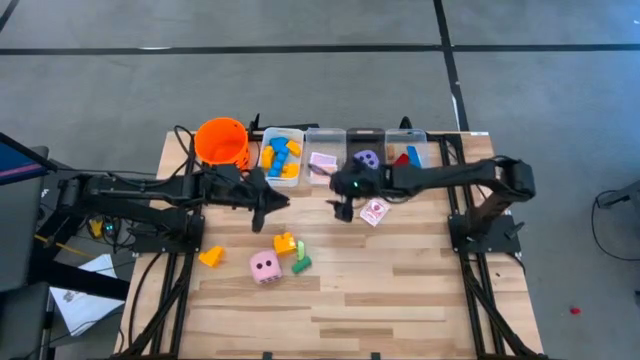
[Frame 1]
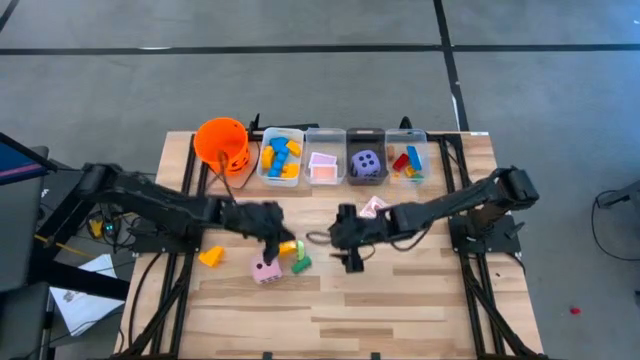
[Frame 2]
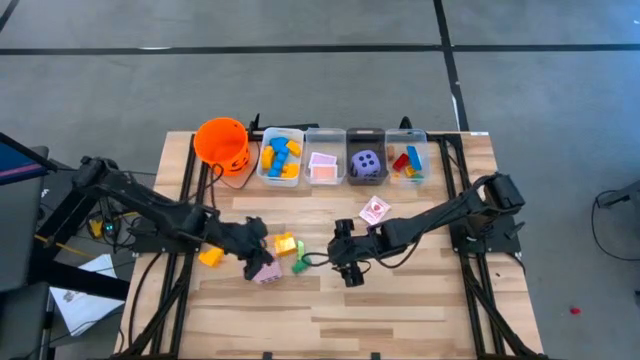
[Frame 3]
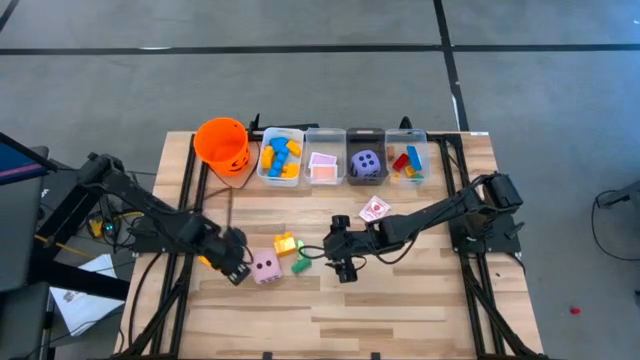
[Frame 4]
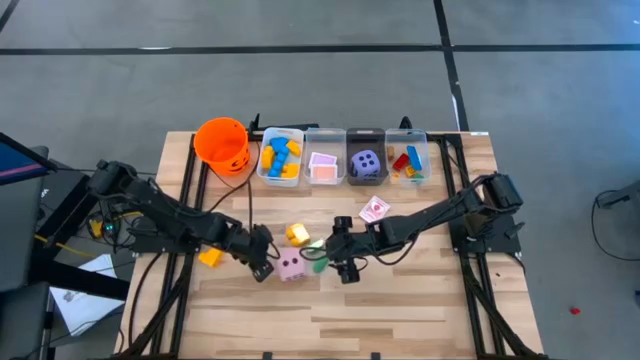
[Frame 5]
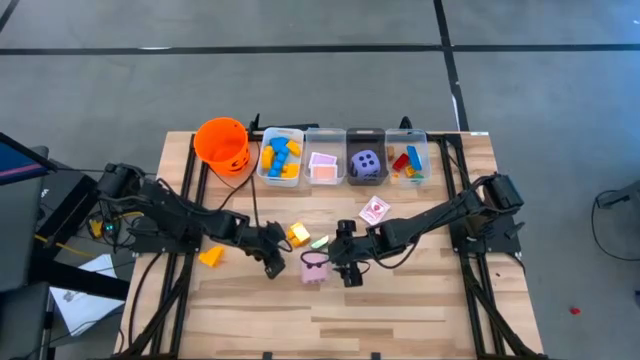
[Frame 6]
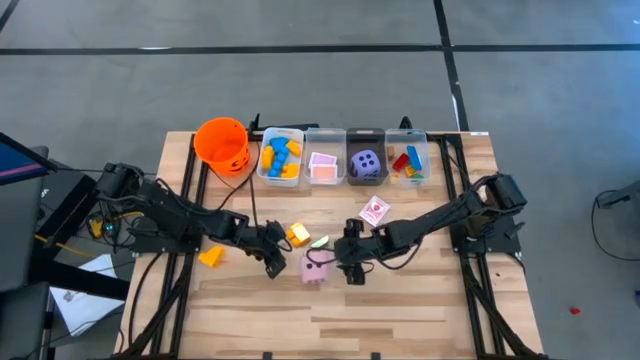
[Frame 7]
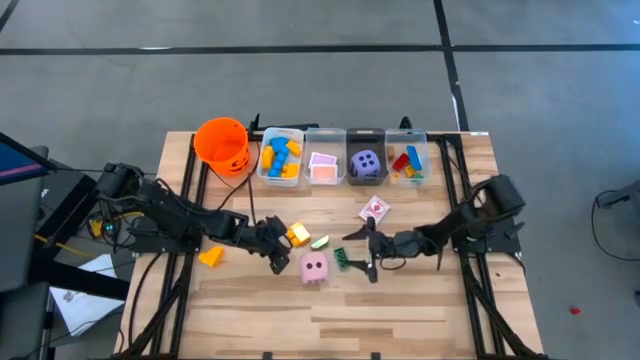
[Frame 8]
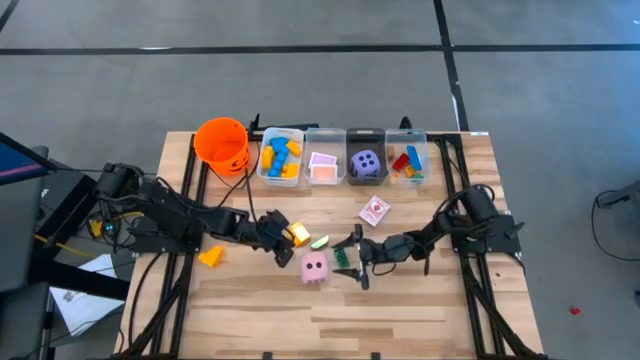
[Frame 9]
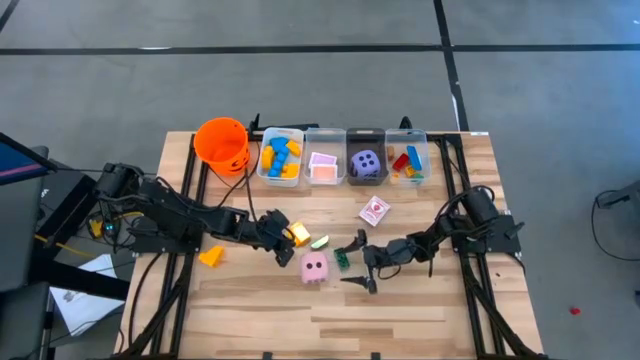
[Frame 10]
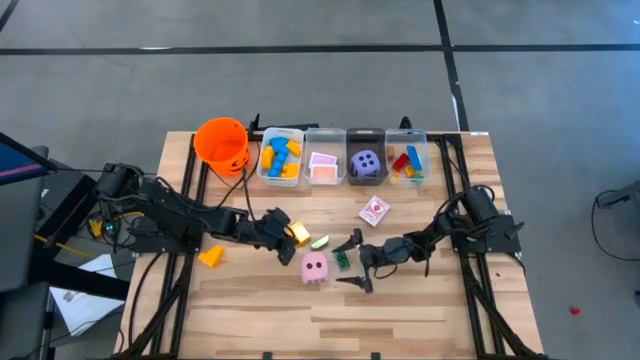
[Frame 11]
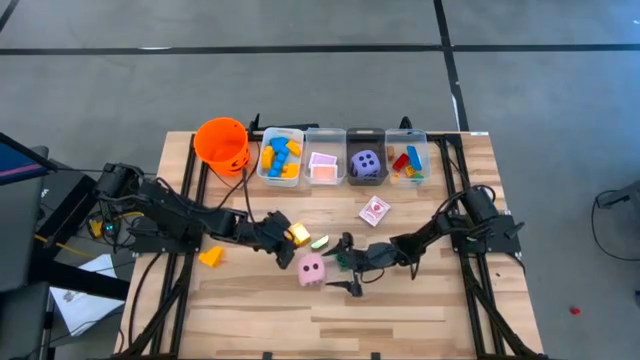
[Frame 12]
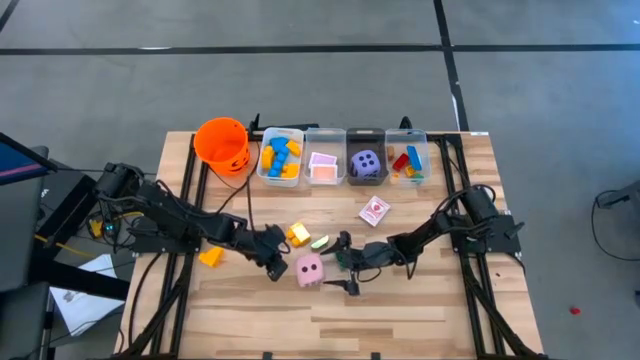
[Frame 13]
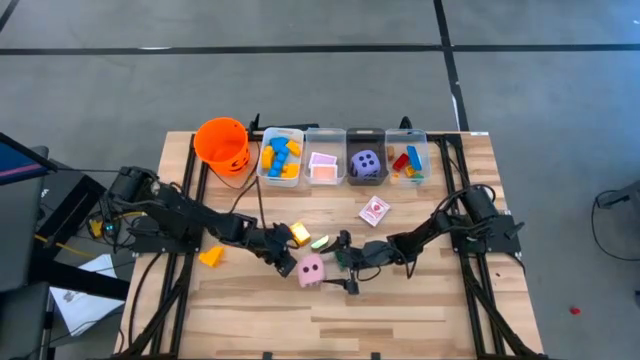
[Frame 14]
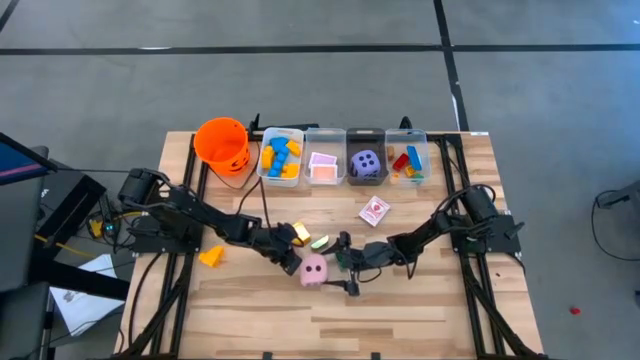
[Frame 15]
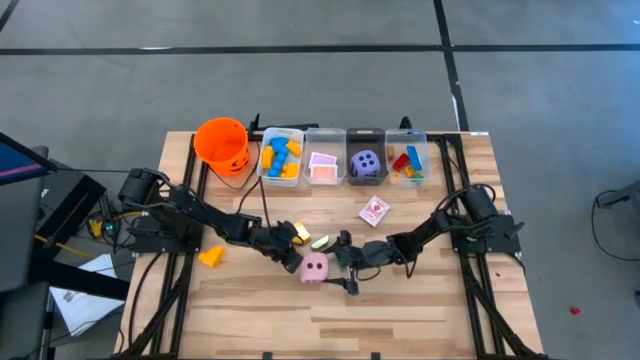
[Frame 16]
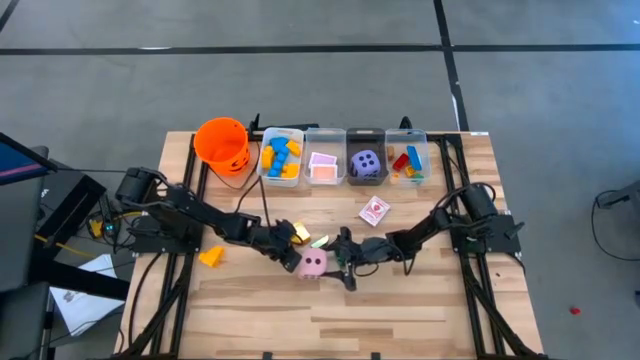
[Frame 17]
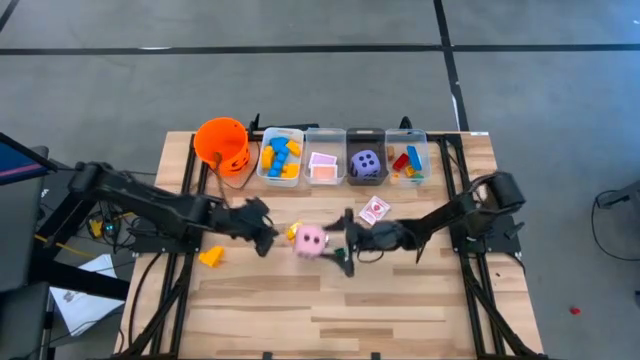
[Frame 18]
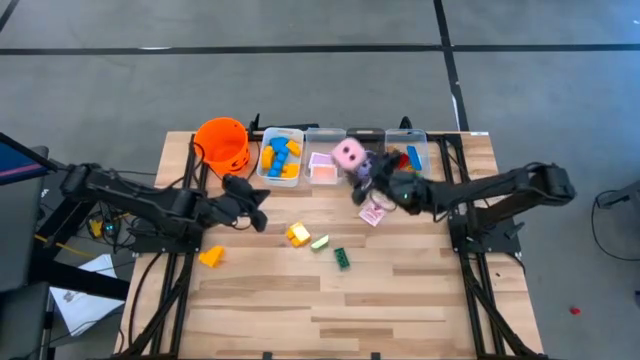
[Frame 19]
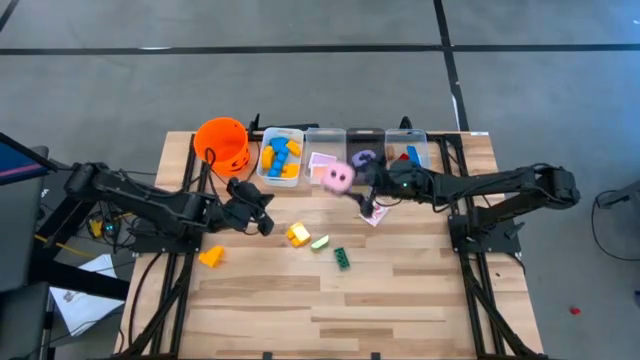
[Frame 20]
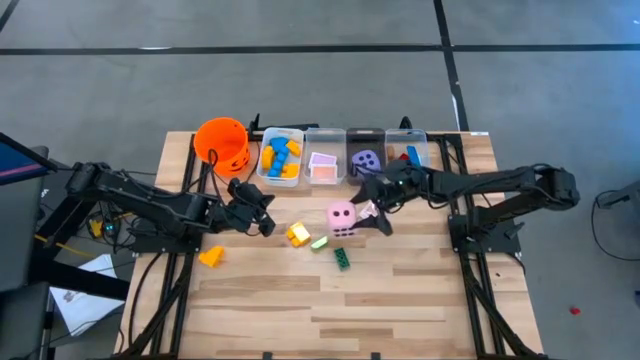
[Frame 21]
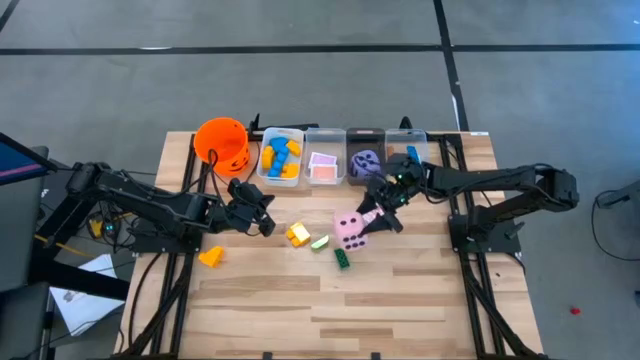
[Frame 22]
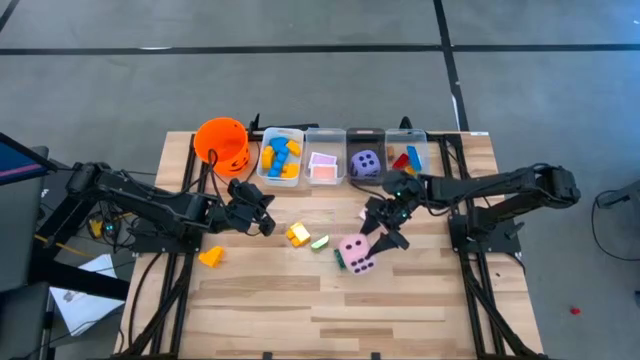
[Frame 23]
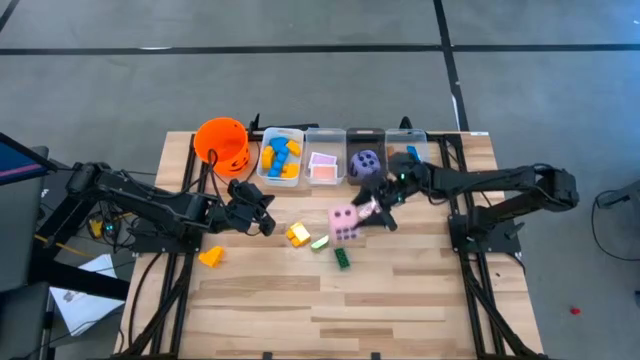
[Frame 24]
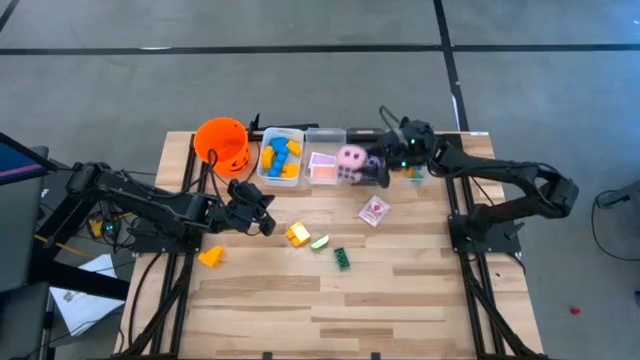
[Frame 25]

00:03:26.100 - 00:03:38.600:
Task: Pick & Place Toys
Put the pink dice into the black bin

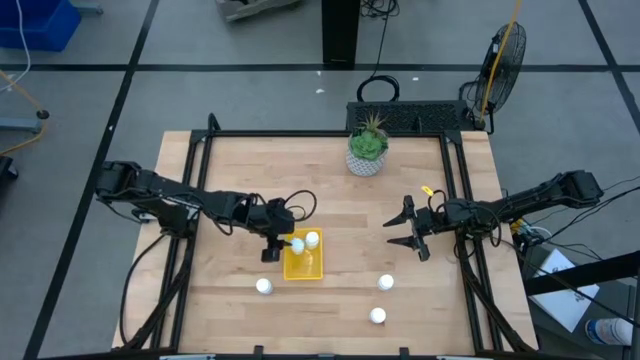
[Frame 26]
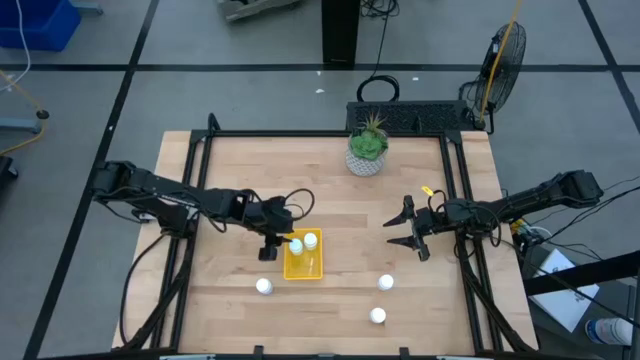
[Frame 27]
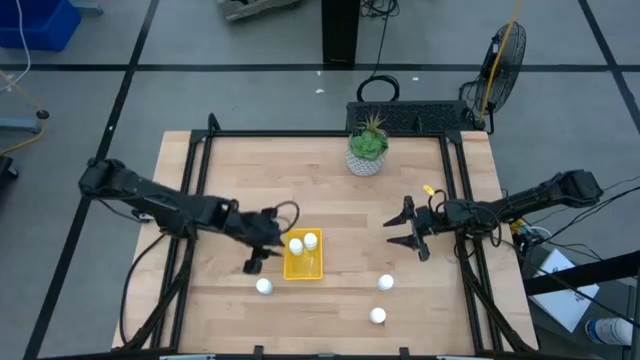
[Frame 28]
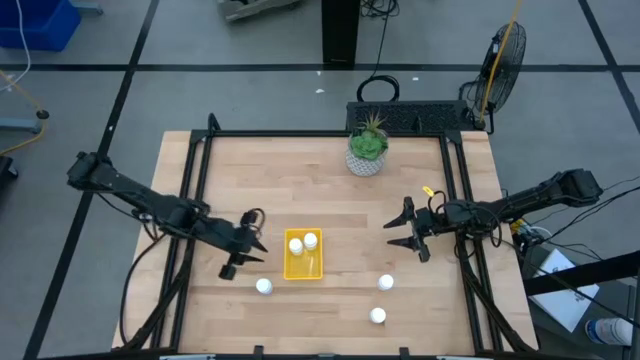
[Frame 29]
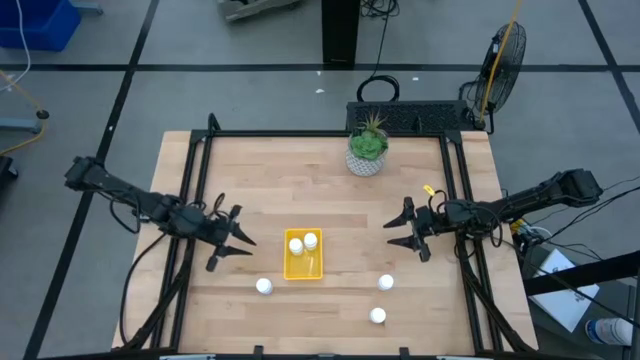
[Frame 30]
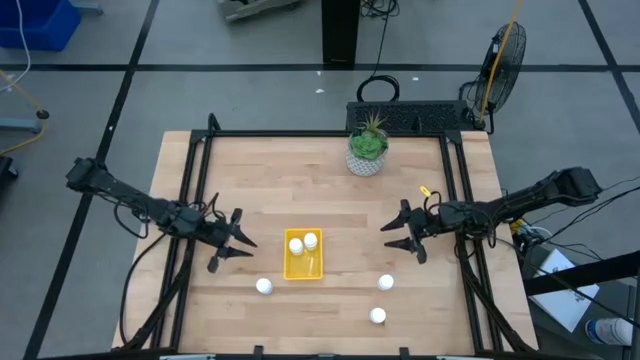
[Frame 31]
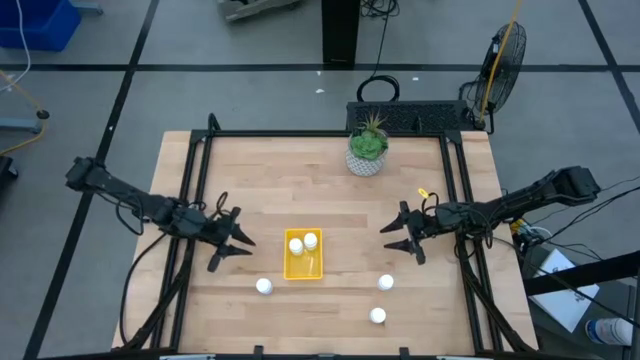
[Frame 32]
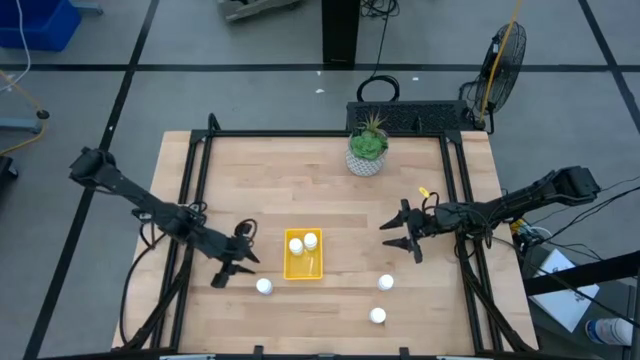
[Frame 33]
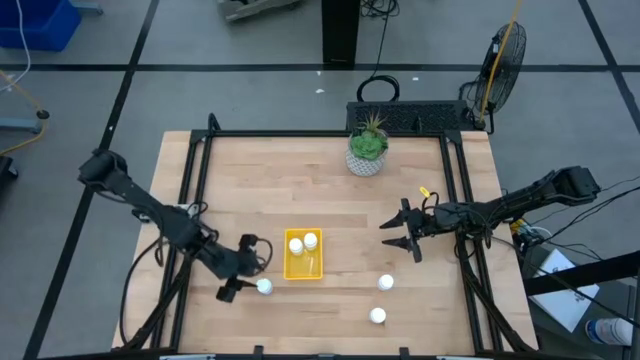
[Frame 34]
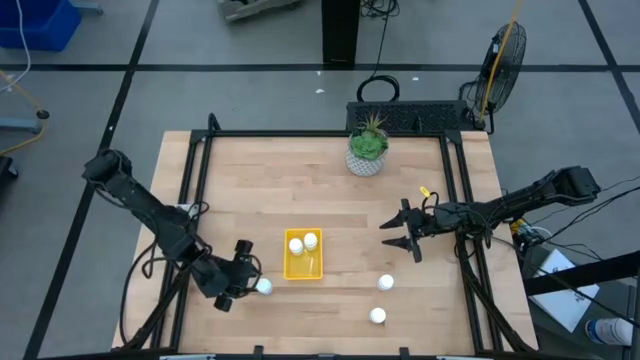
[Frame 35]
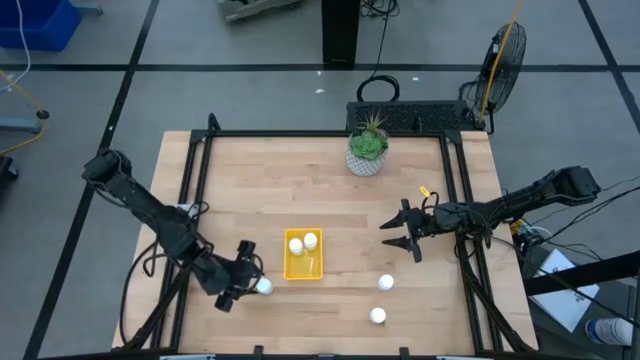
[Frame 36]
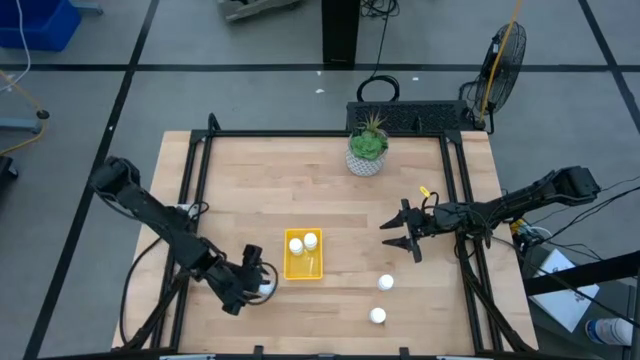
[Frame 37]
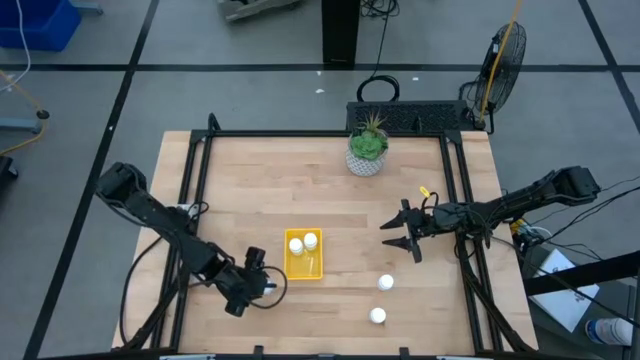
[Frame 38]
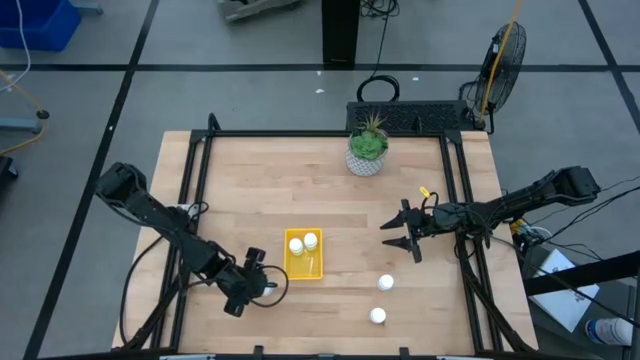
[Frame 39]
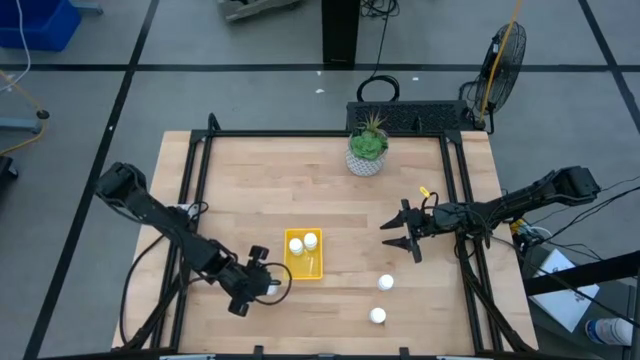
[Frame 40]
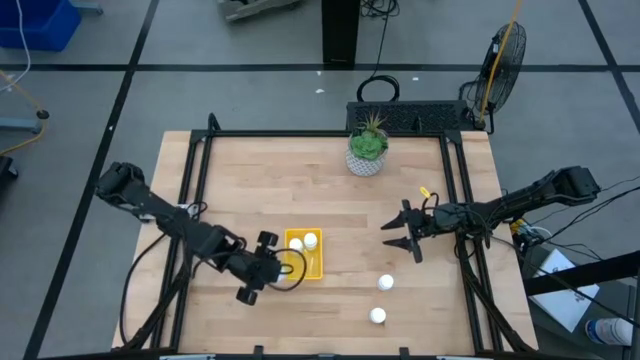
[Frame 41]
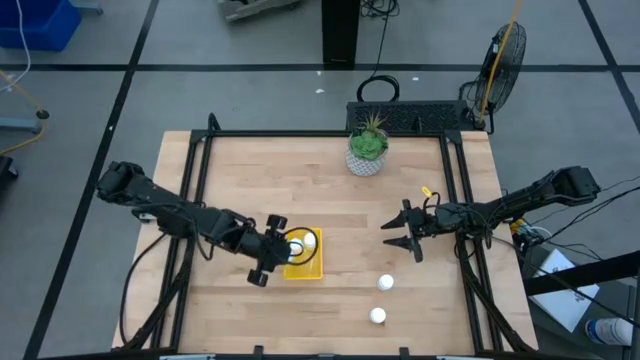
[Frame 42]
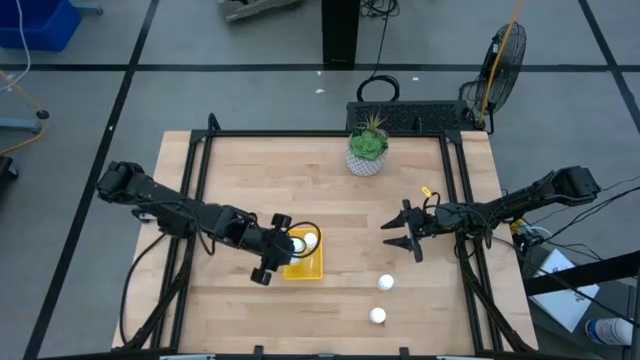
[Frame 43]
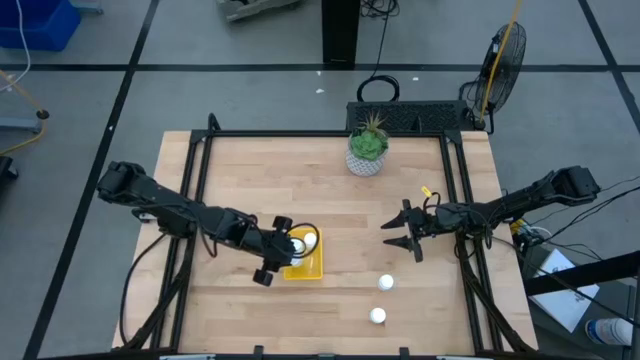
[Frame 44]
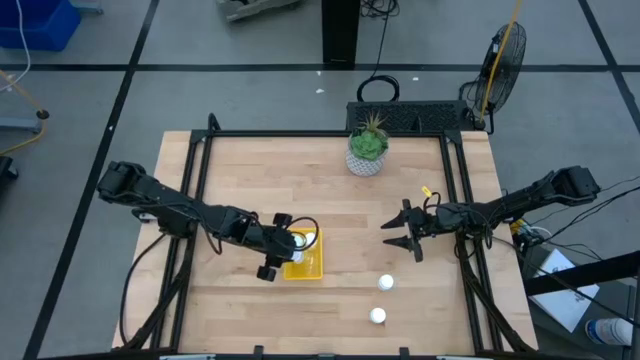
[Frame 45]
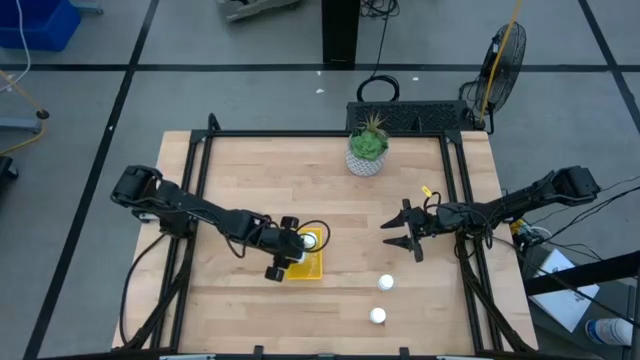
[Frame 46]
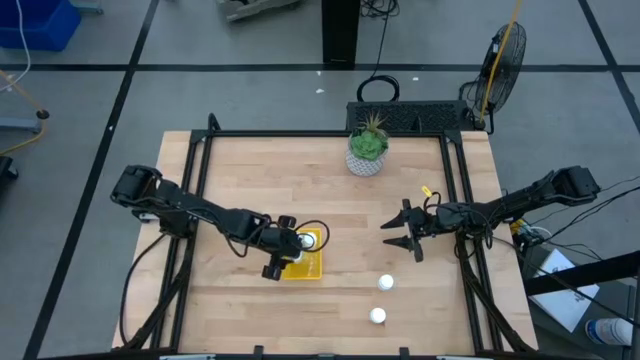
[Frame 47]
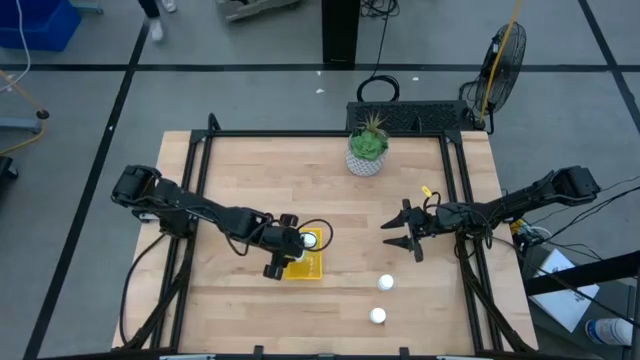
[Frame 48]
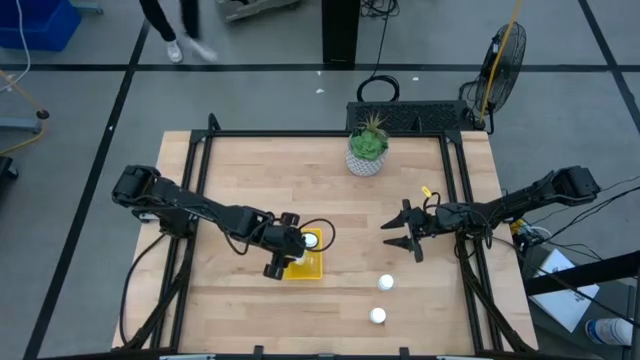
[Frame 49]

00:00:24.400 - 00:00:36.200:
Task: Pick and place pill bottles into a basket
Put the white pill bottle into the yellow basket
